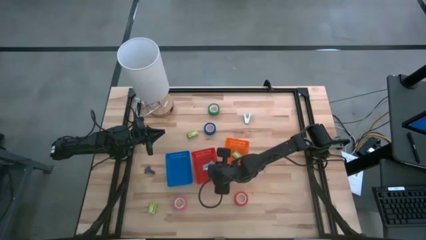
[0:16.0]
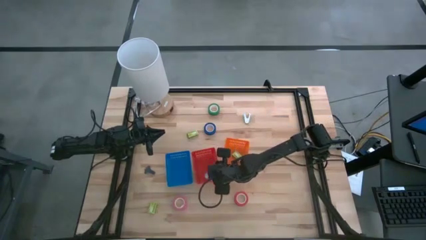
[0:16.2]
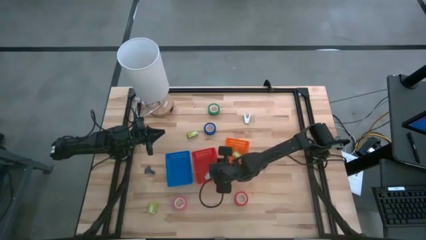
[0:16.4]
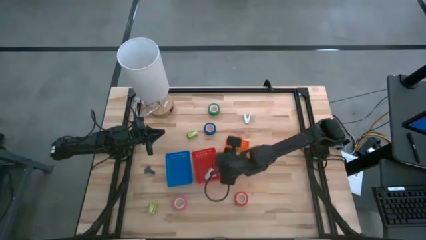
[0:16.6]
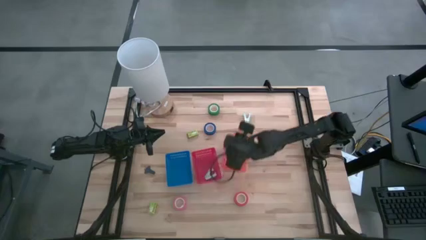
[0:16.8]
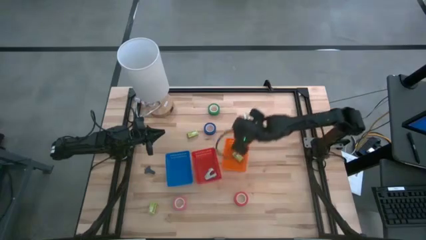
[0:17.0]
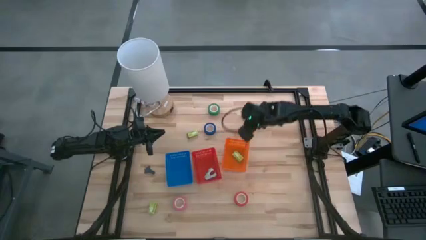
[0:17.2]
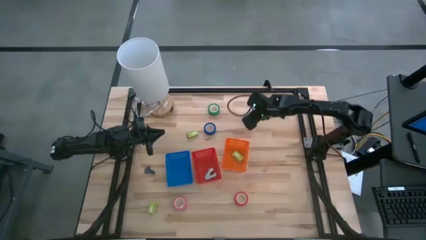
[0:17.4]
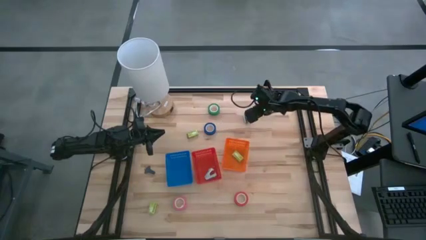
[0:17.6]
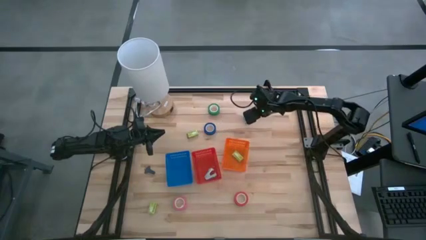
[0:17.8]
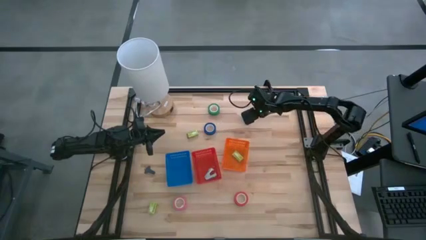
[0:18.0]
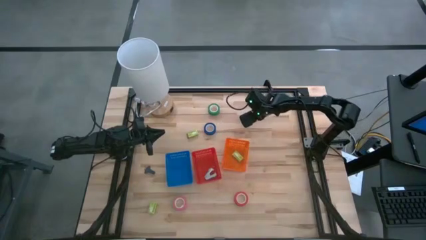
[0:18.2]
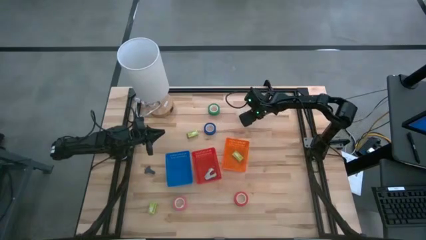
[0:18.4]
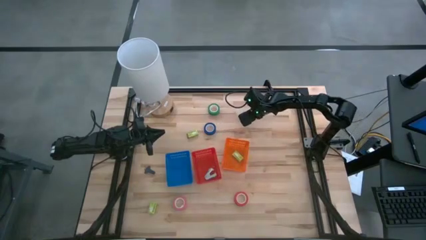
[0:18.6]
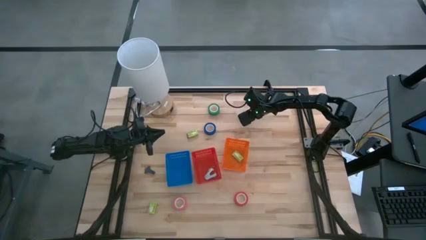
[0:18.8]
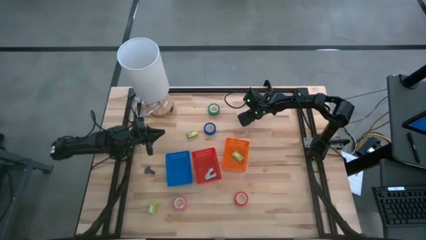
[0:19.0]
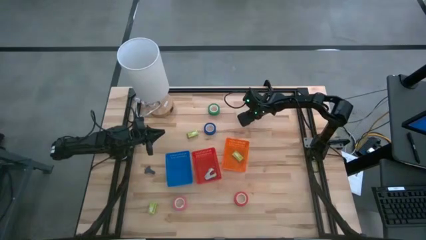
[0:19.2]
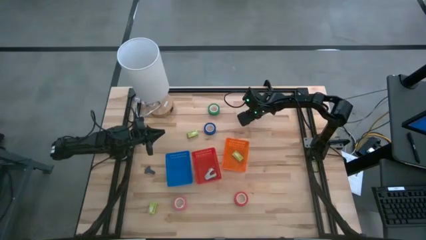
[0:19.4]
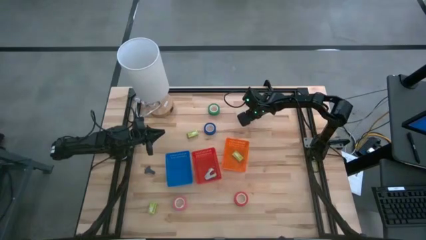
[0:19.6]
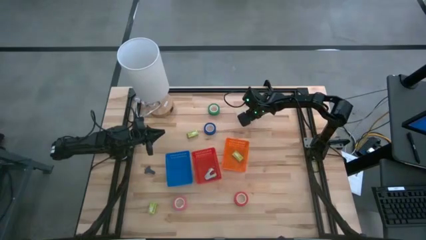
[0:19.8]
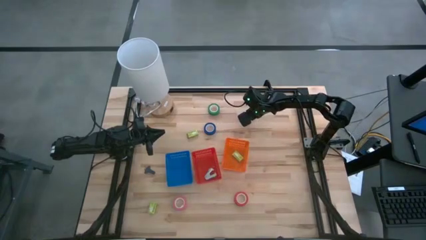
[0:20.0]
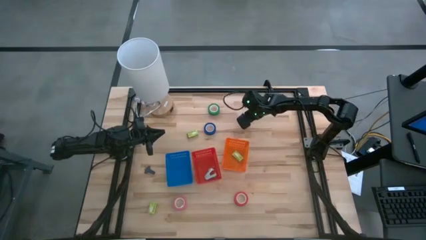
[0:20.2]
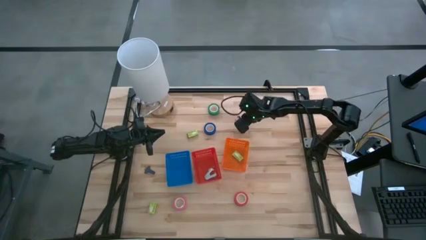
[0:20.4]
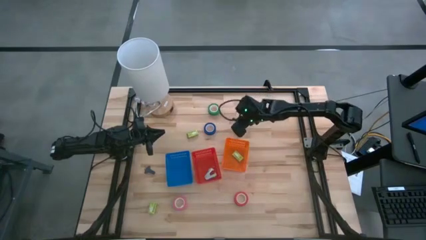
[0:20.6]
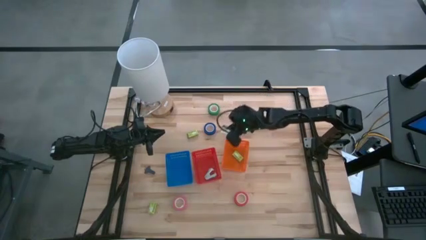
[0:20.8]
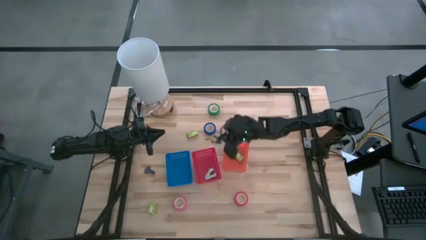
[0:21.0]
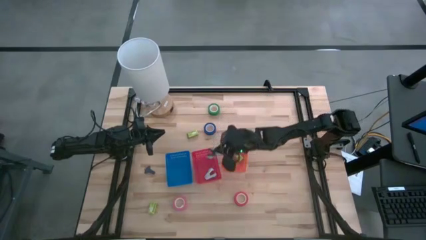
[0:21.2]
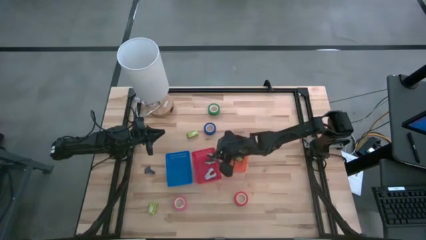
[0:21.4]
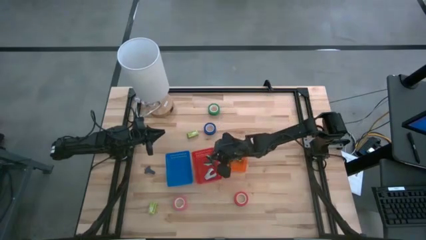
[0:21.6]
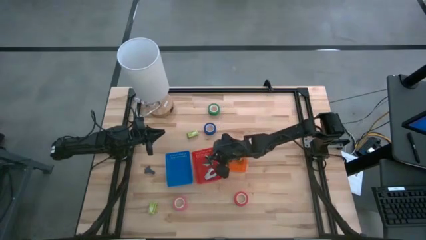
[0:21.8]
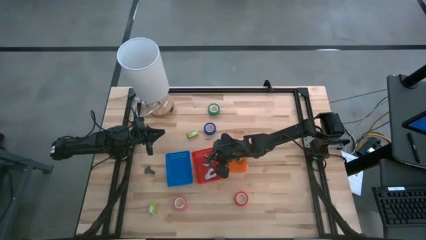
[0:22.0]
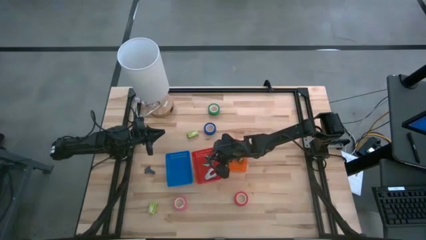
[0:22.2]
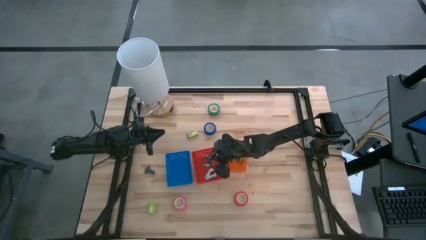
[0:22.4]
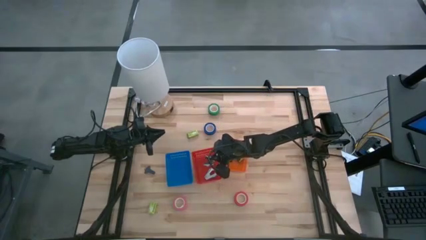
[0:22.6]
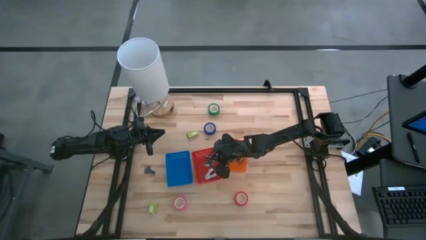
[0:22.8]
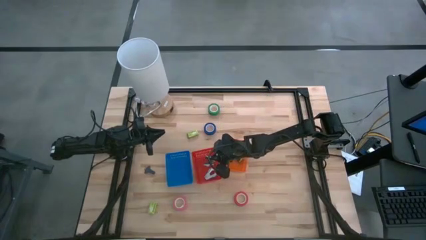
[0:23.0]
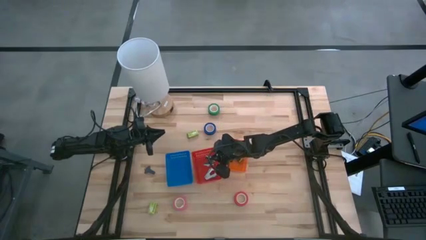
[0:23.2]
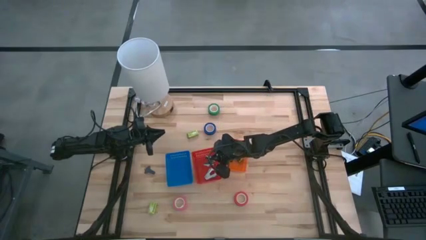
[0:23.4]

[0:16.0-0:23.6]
Task: Pick and place Stapler, Stapler remover, tape
Put the blue staple remover into the red bin

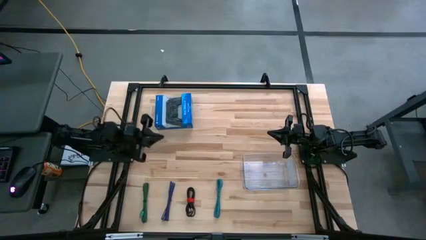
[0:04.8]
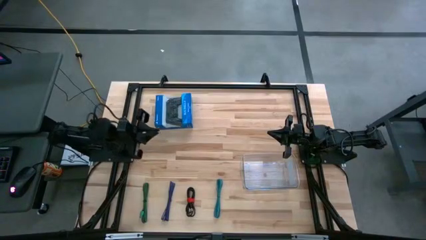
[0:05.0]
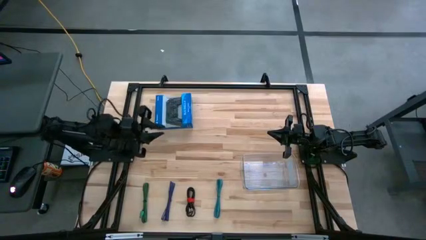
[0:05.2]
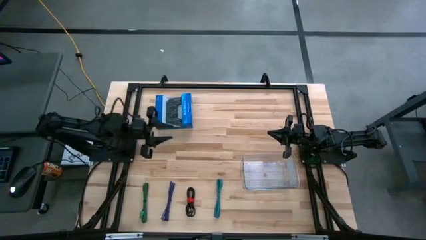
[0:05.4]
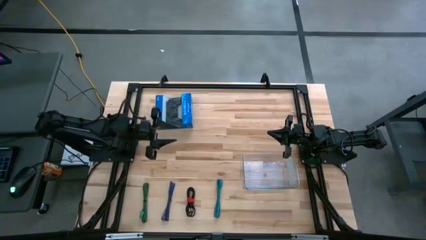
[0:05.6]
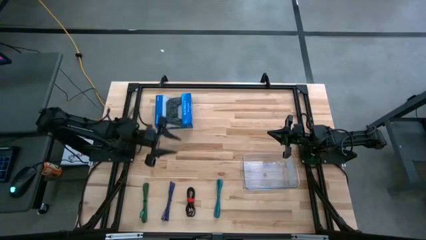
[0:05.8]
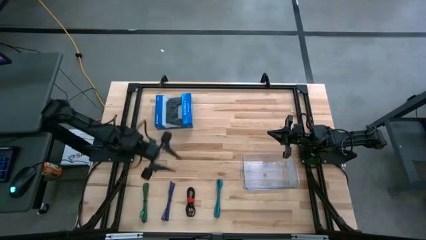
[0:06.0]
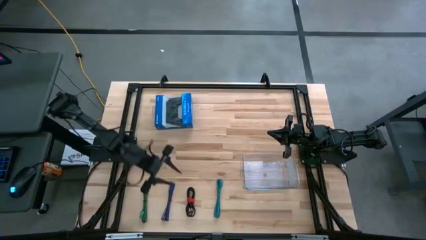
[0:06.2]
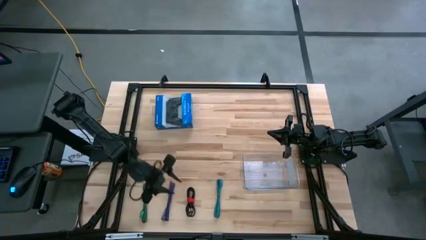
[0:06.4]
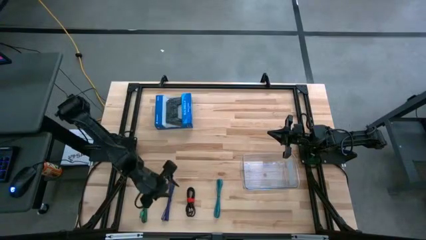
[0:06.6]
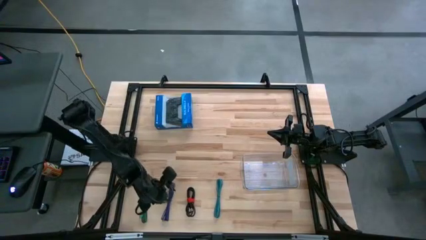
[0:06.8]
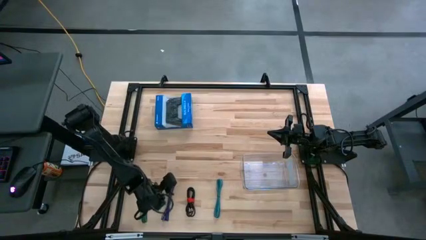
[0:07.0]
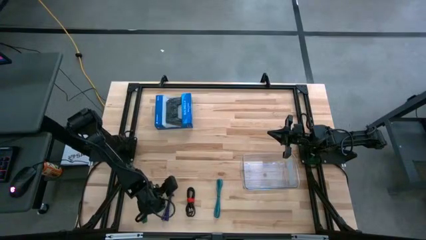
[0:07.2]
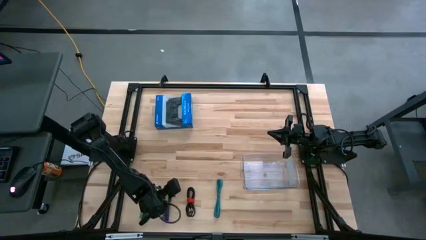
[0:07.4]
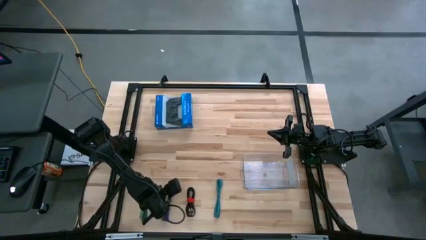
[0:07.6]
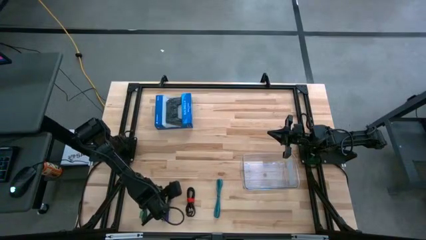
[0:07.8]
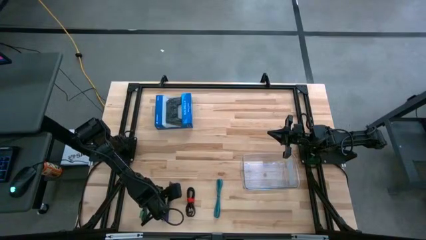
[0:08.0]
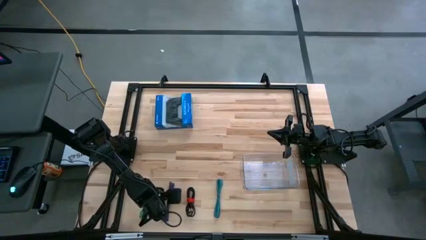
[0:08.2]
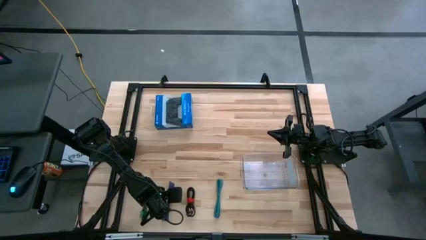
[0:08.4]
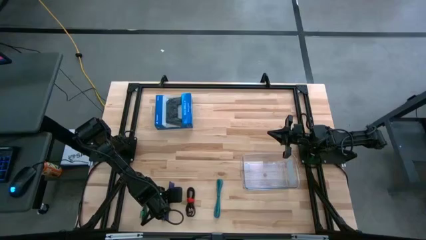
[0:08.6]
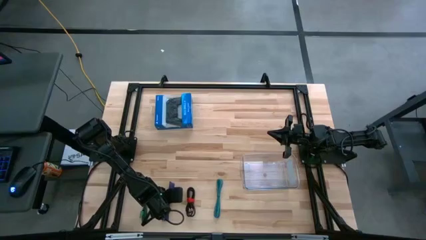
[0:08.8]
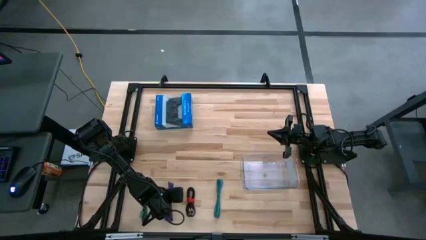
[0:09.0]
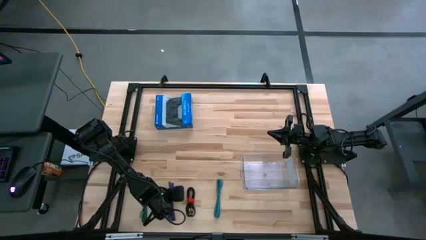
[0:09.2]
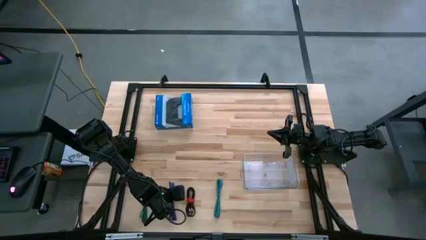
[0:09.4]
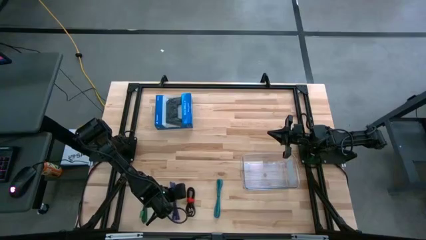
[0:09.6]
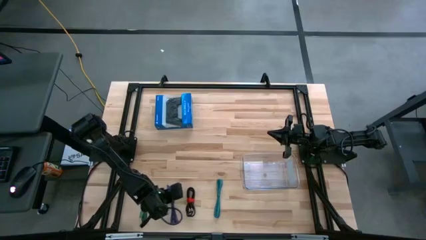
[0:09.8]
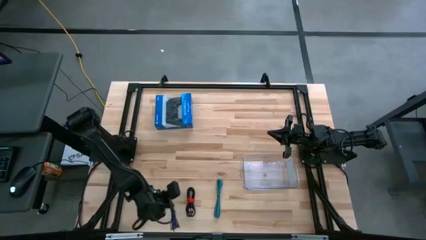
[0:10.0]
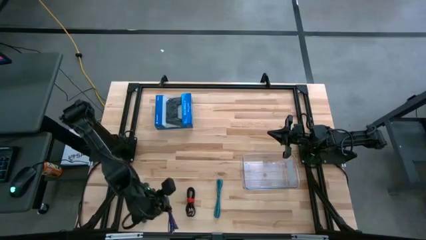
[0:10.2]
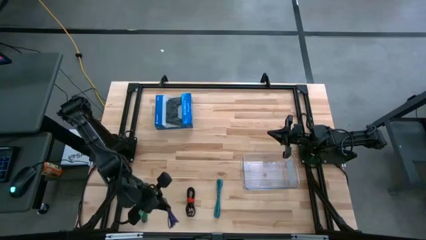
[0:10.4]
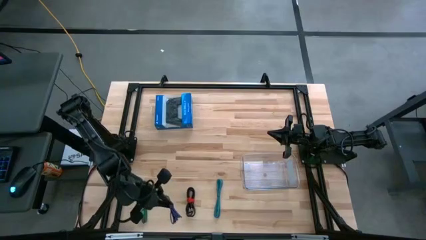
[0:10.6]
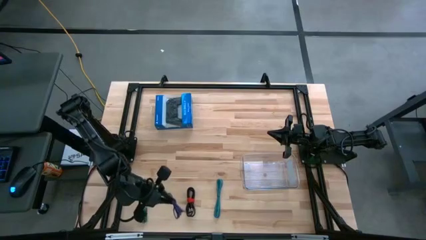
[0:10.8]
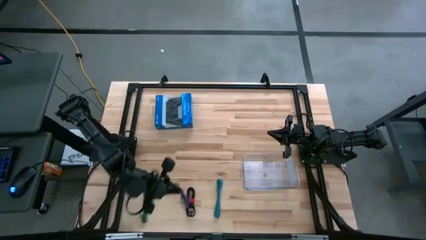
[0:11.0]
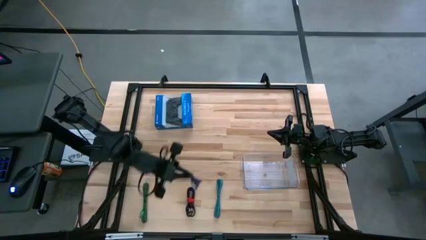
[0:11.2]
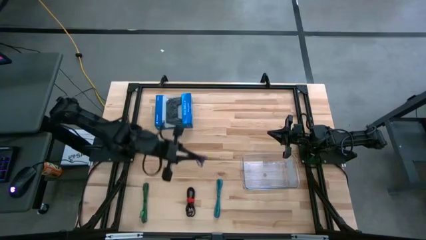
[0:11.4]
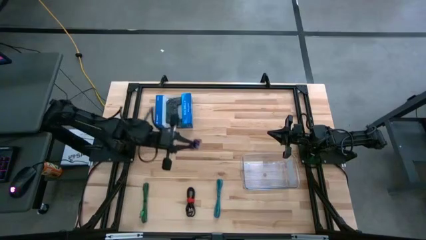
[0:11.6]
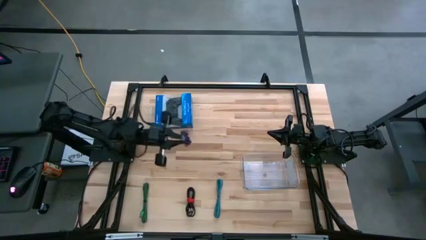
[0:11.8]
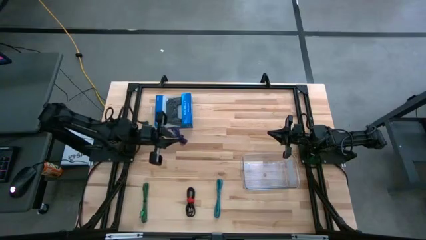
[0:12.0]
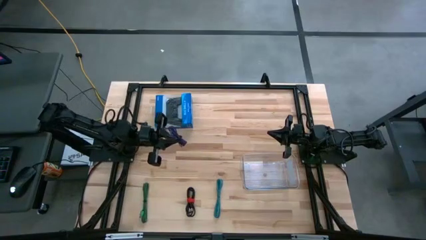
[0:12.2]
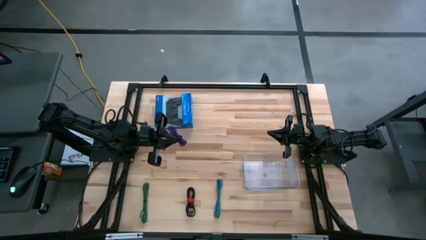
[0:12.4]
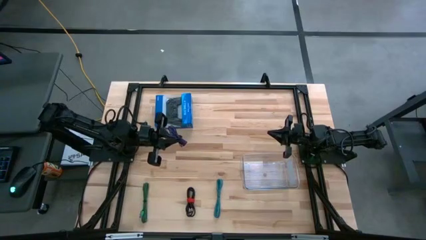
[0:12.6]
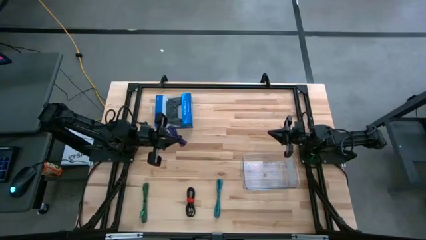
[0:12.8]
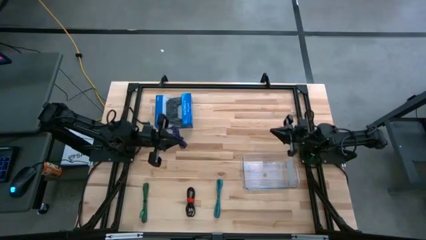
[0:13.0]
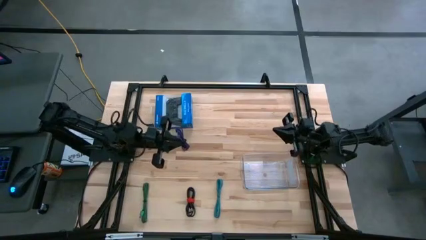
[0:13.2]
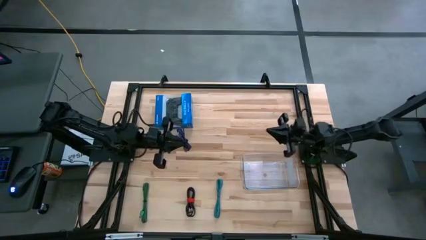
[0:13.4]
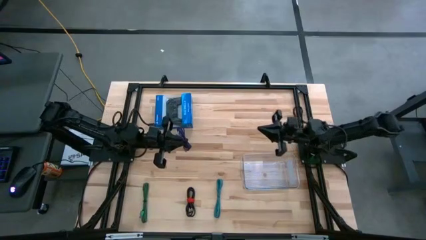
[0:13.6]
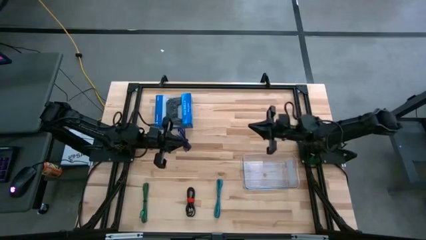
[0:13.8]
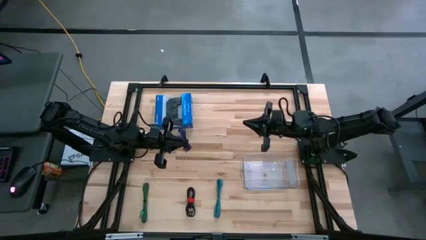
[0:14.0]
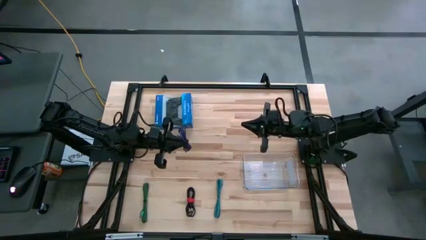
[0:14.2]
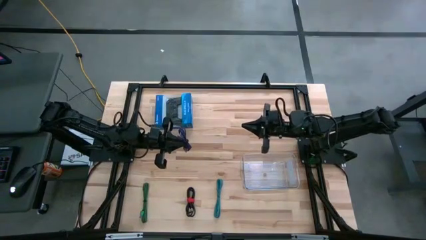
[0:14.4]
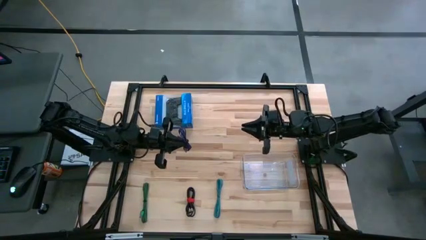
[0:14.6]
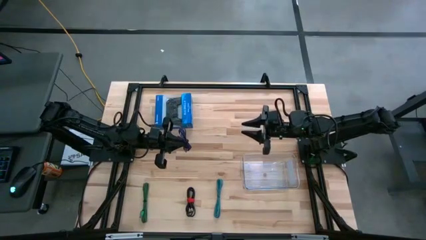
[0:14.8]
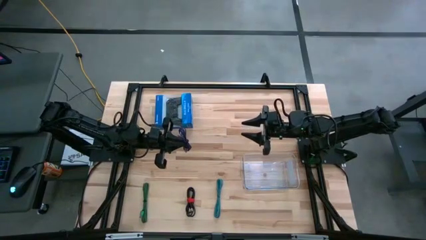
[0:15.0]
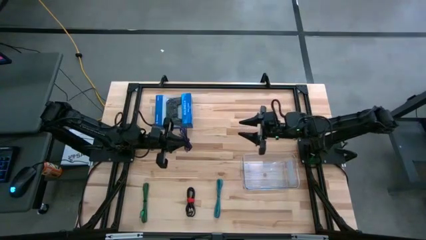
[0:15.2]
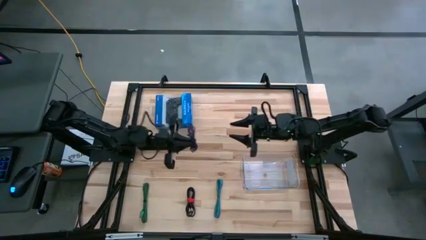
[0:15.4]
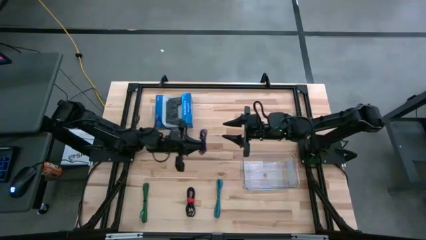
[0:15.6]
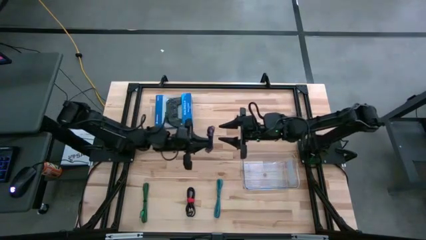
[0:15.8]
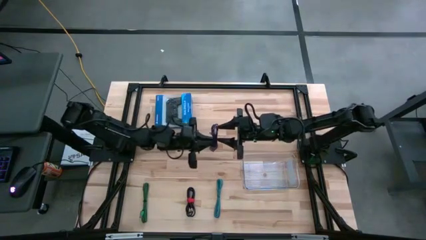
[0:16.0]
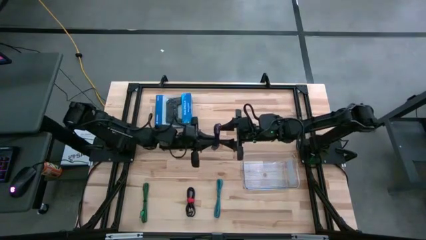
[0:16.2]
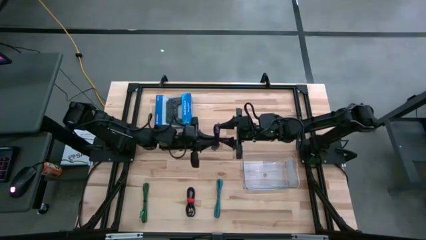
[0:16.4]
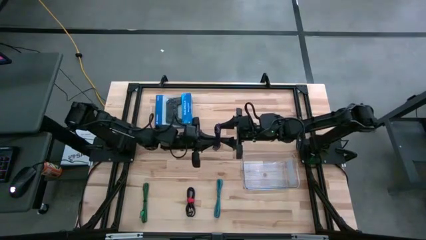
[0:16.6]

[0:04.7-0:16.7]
Task: Pick and place USB-C Cables
Put the purple charger cable into the transparent bin
